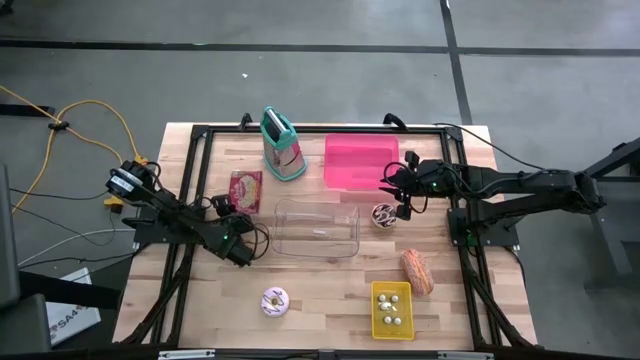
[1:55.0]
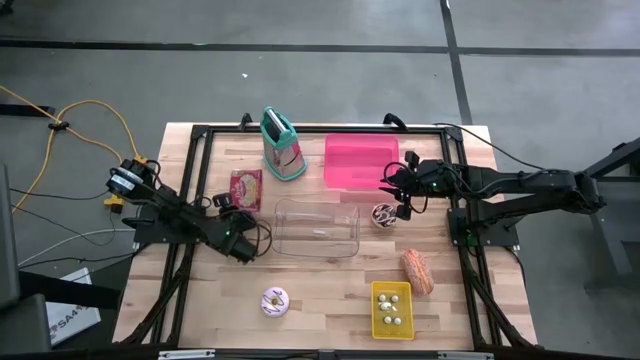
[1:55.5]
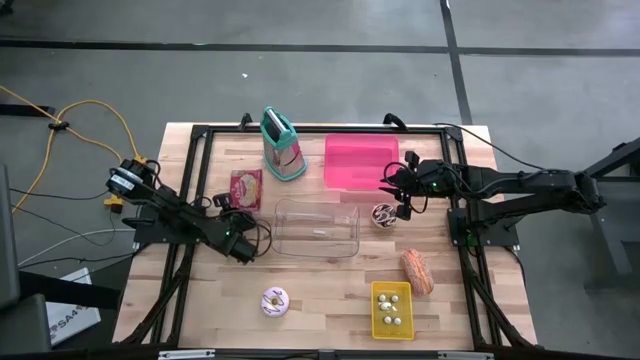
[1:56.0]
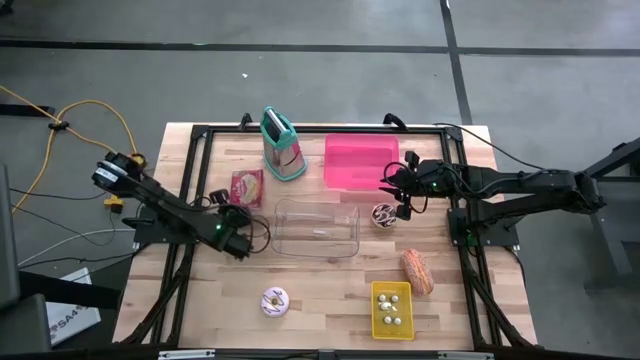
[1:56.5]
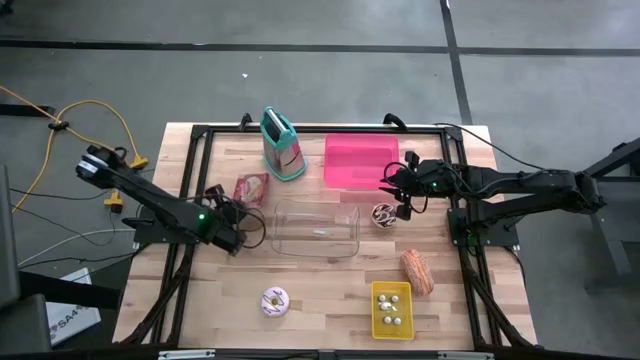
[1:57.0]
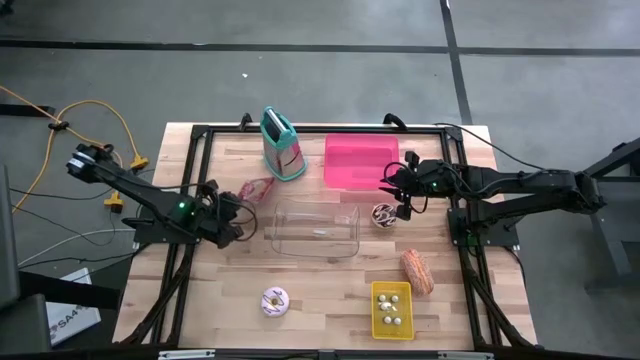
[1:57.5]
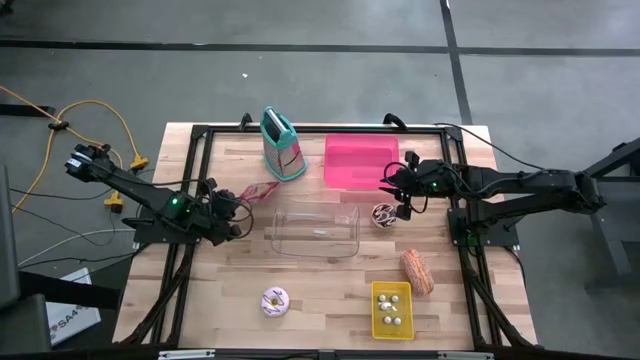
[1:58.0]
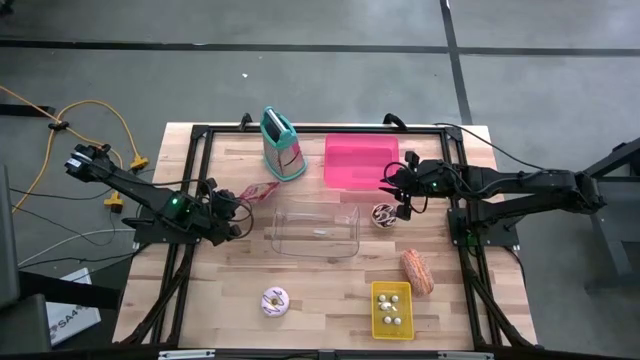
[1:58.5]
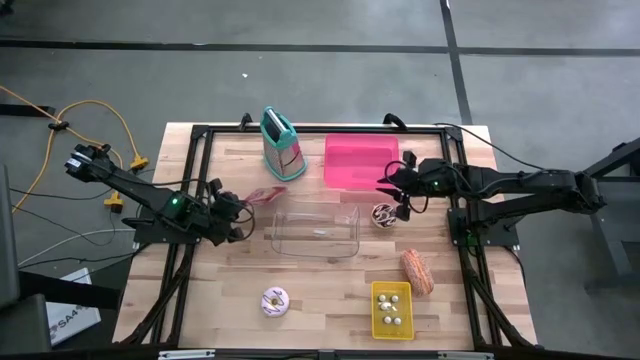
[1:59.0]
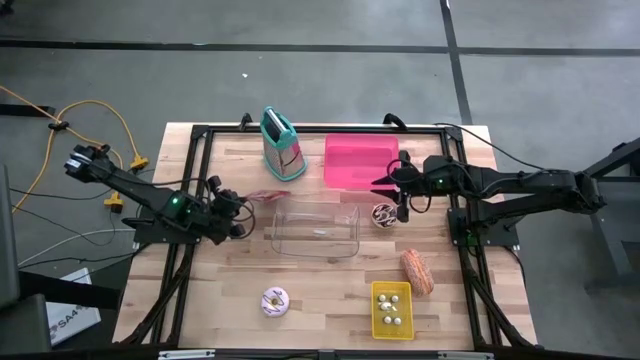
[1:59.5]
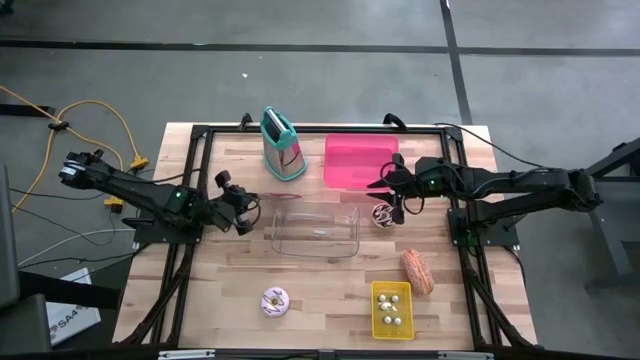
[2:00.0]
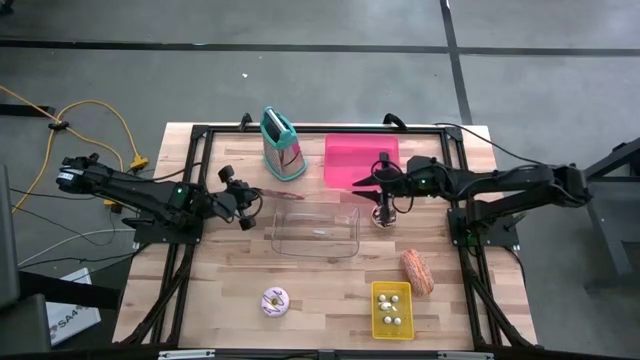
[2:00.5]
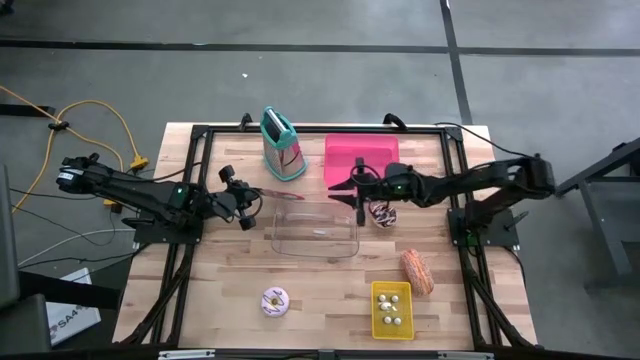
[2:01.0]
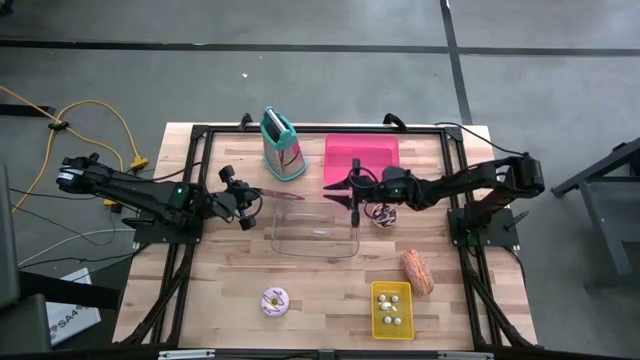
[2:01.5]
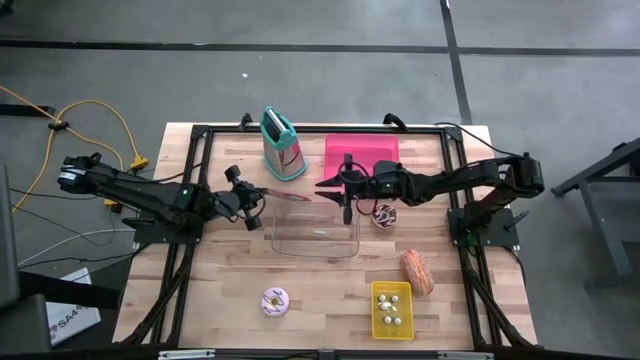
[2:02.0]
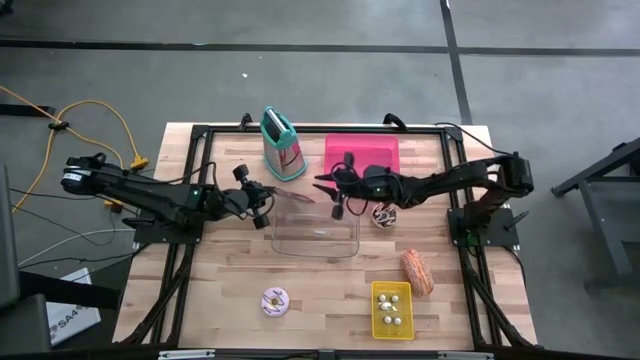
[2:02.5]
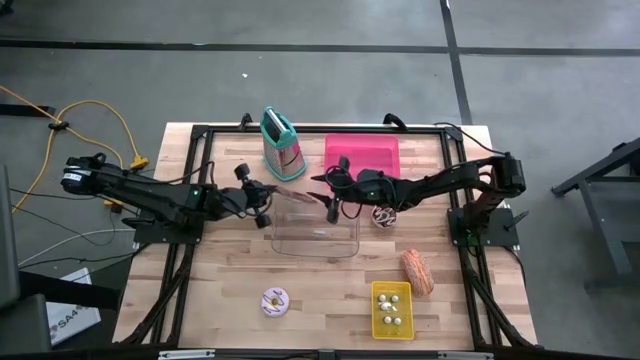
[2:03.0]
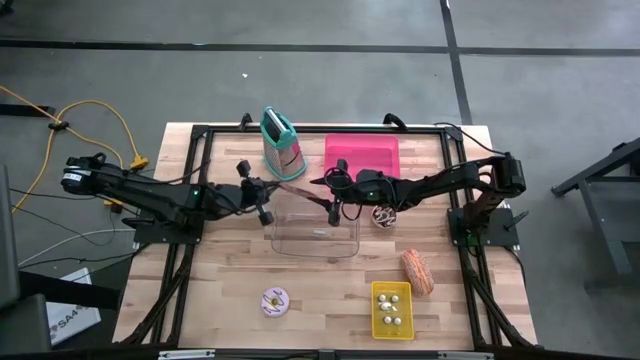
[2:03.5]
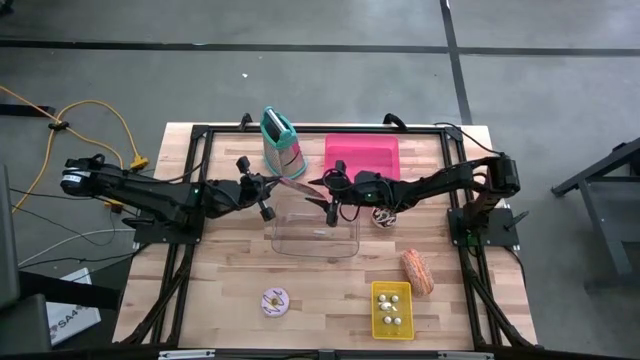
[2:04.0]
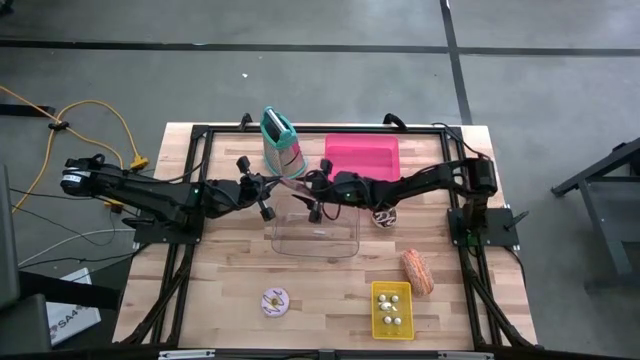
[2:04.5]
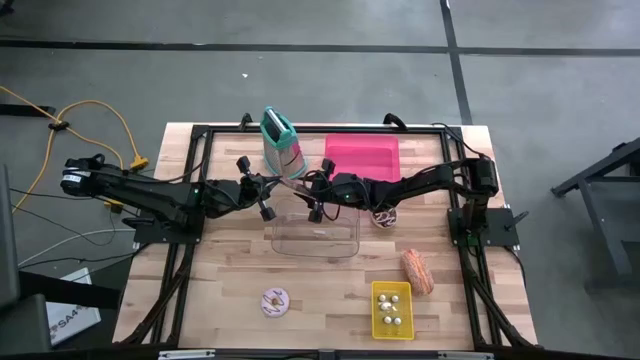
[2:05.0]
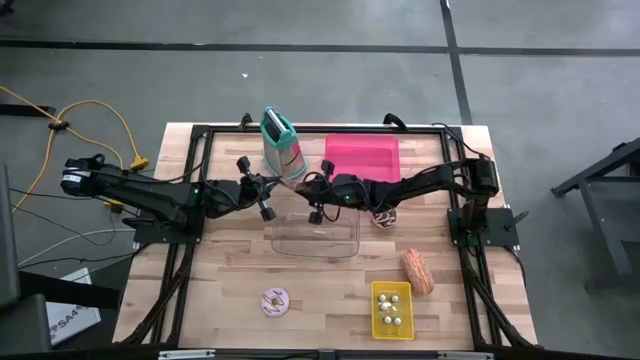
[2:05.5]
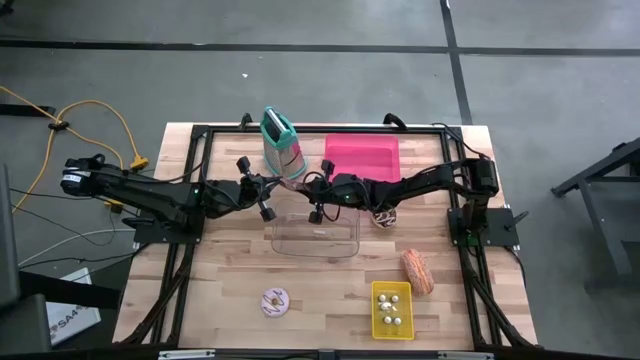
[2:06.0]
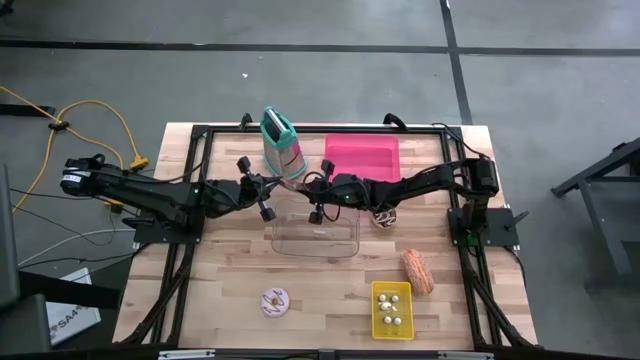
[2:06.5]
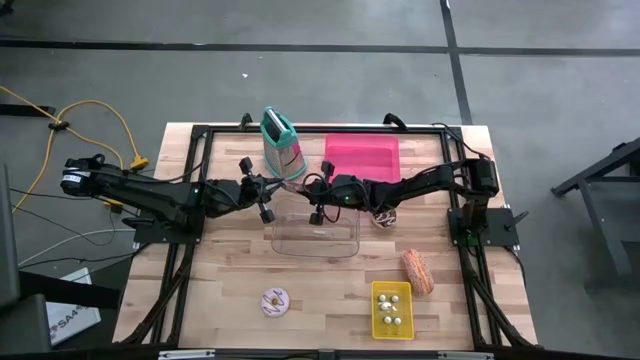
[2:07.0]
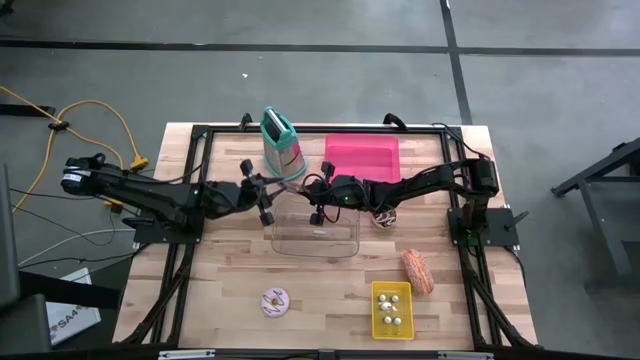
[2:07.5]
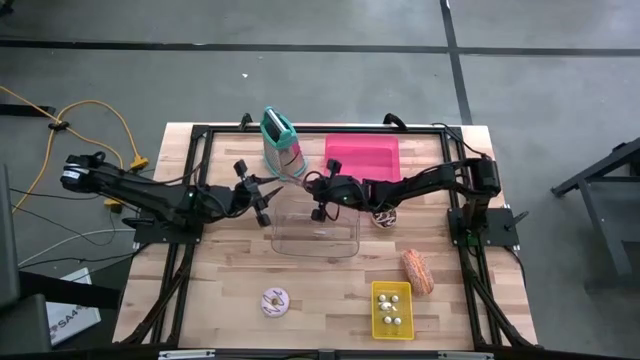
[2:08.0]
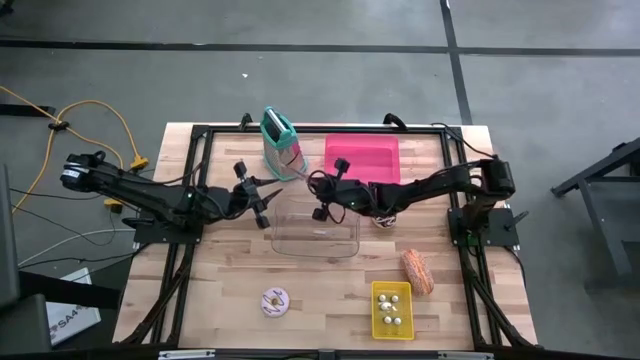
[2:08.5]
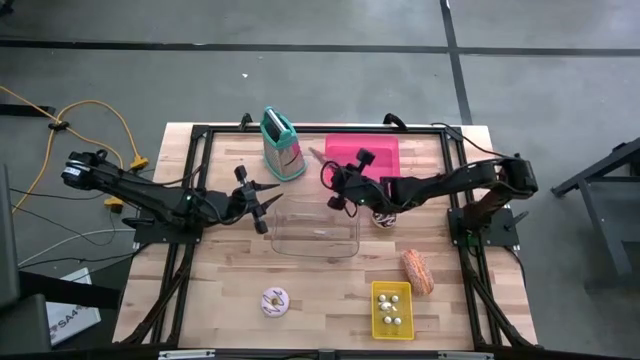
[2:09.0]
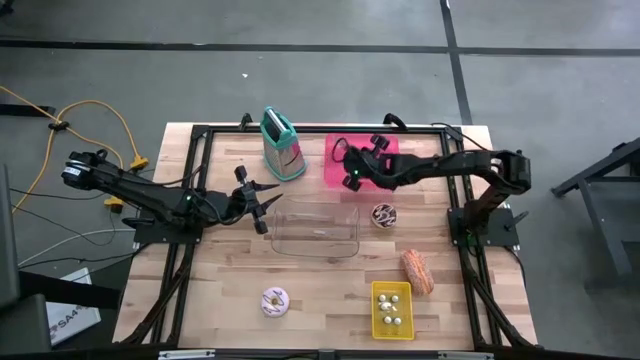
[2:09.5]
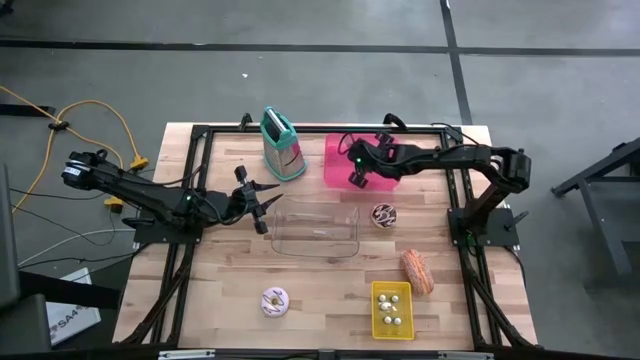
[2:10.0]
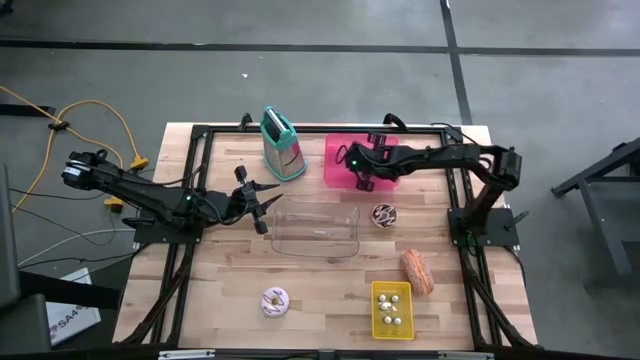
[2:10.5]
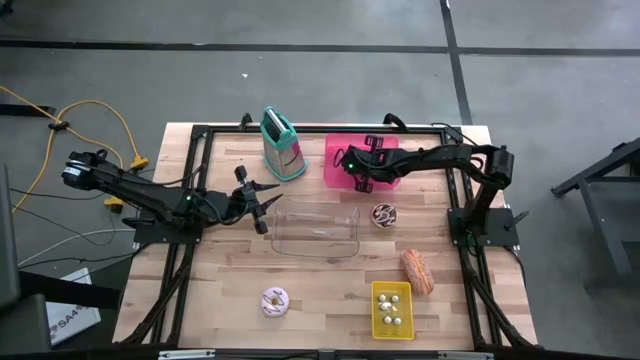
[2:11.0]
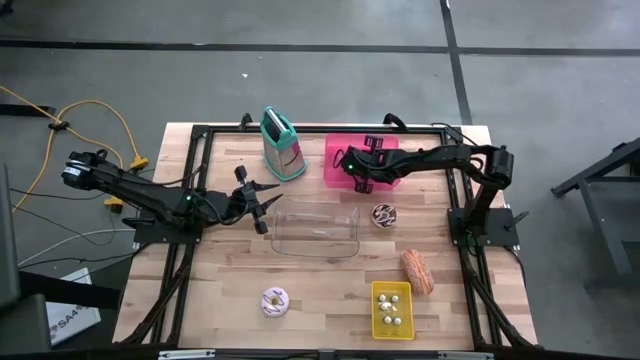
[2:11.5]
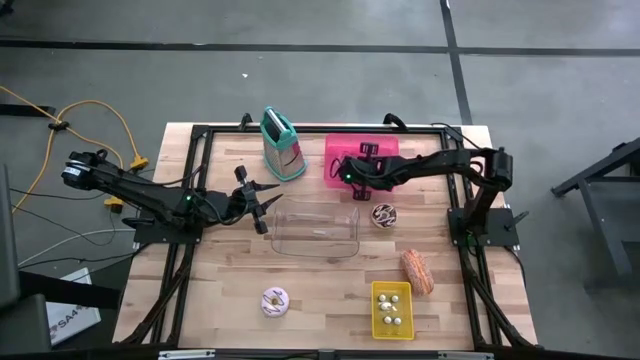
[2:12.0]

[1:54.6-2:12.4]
Put the red popcorn bag into the pink bin
